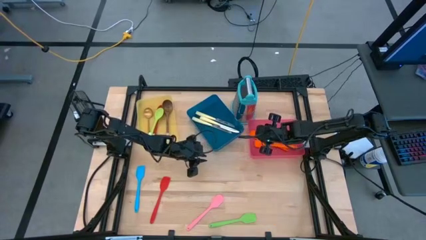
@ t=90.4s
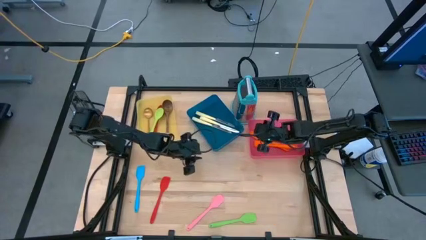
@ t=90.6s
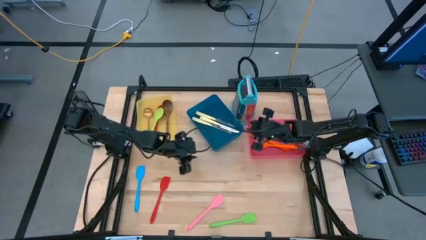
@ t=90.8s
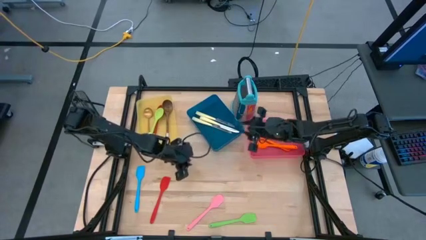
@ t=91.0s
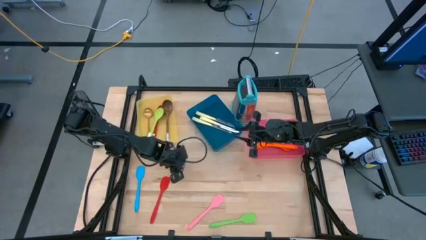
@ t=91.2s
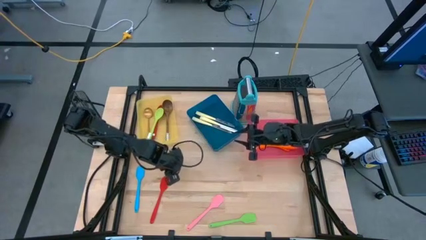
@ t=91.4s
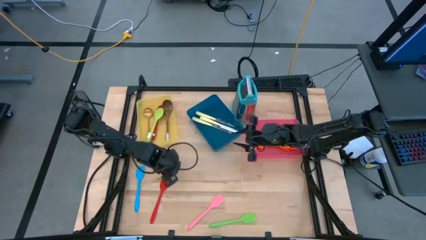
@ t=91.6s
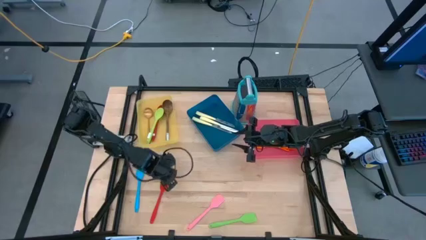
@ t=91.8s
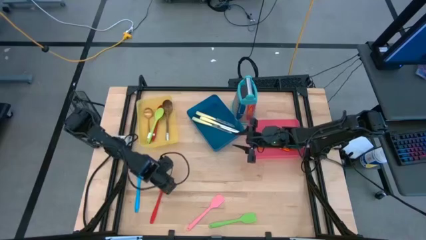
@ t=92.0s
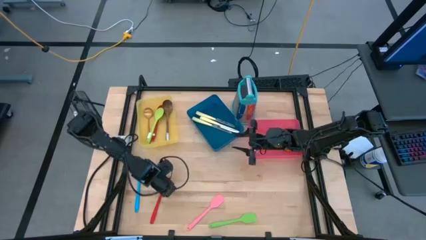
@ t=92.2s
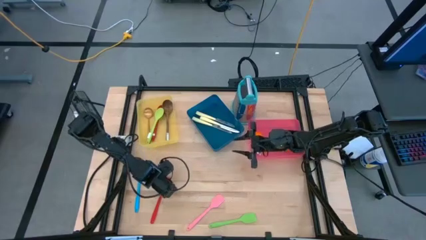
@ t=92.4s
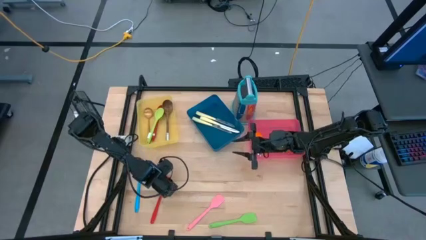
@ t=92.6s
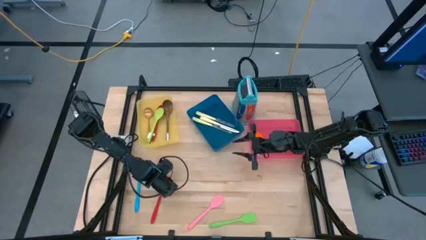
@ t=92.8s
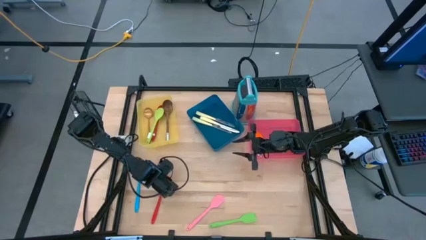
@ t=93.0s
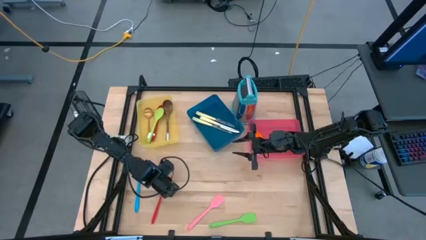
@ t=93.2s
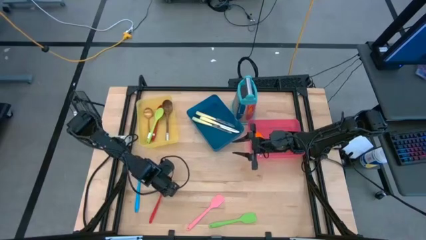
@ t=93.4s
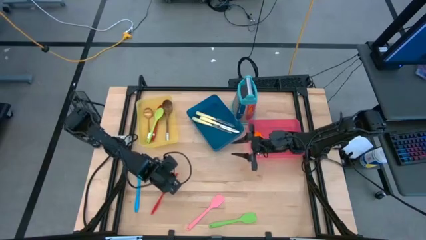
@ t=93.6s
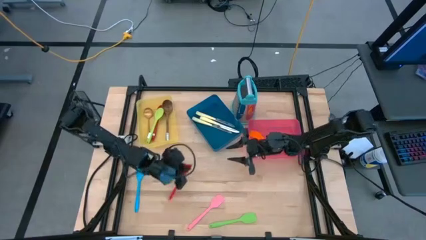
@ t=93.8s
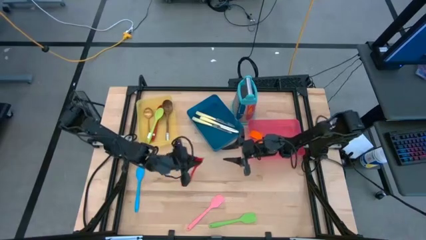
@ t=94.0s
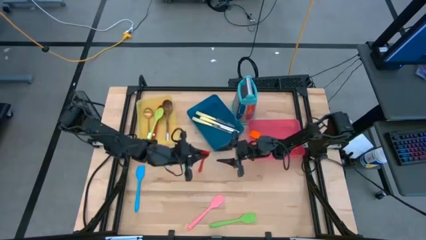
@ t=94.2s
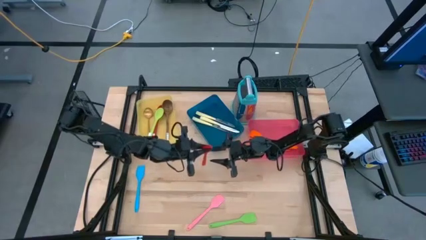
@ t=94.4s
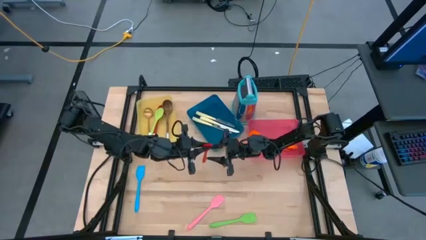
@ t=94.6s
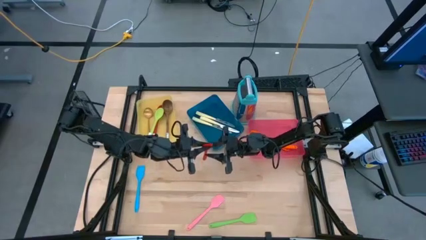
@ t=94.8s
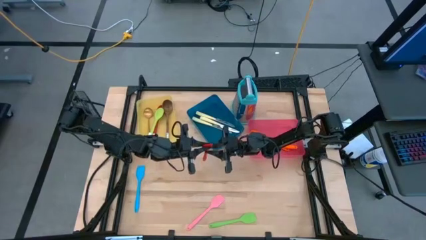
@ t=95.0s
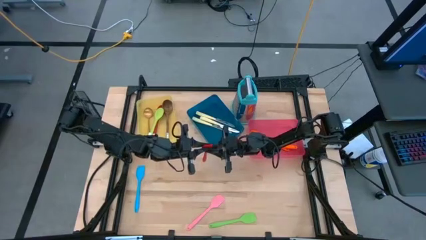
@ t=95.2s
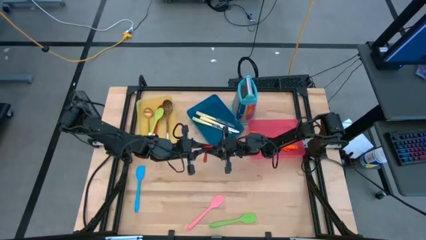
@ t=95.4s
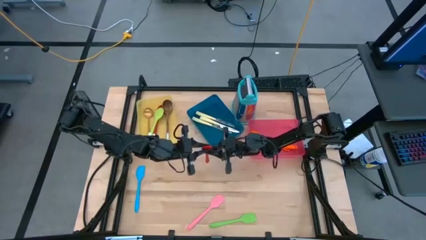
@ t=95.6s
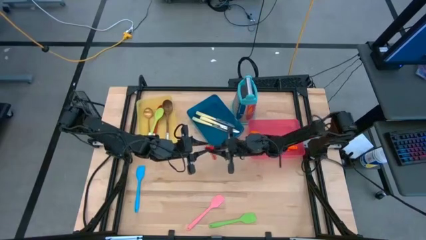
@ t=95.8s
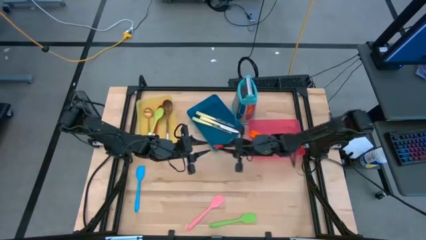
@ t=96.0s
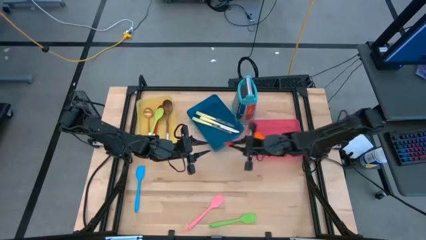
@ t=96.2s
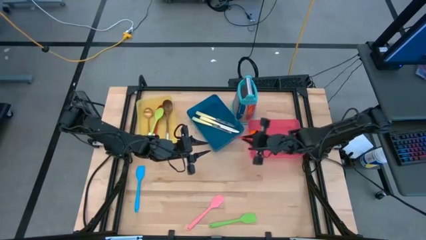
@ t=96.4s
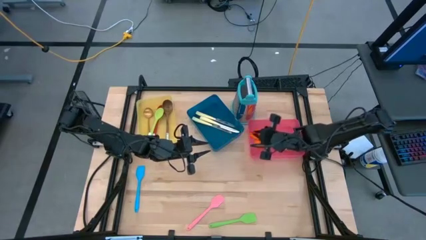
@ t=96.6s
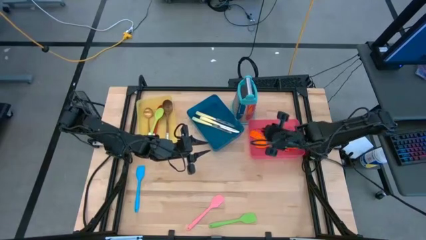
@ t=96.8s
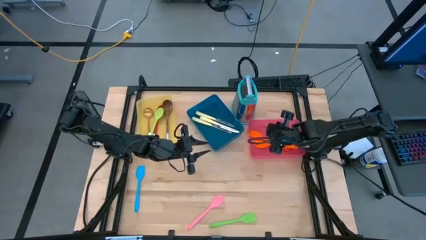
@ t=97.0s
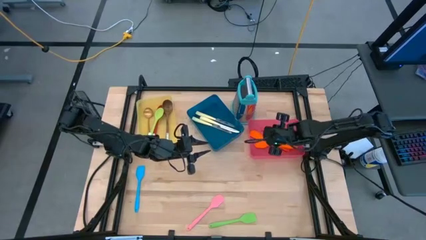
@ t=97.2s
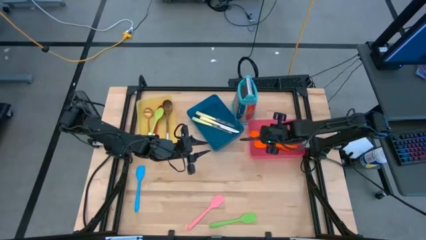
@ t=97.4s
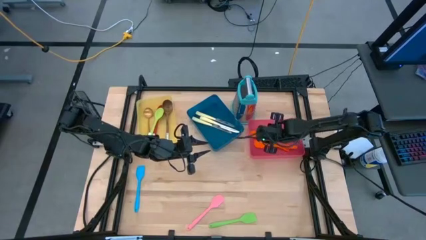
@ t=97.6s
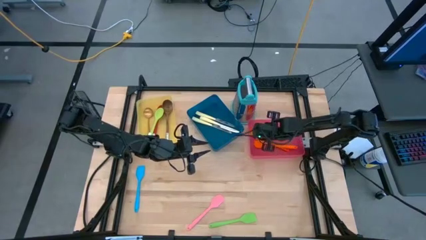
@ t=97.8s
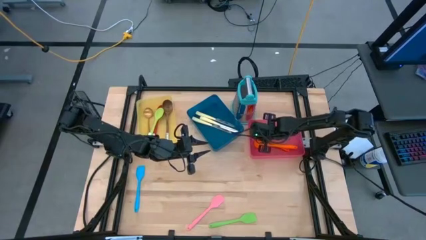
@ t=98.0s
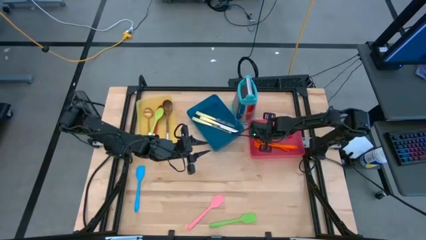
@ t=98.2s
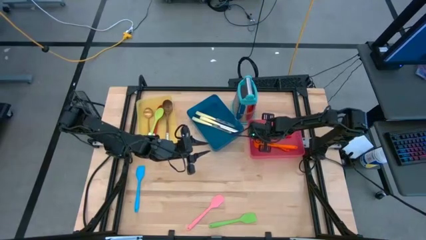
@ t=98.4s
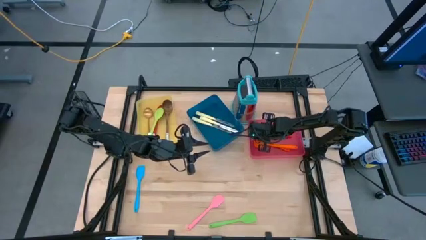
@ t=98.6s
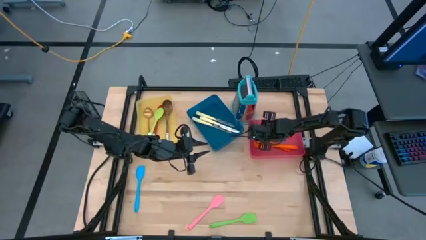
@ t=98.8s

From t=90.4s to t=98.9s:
Task: Pick & Place Kitchen Items
Put the red spatula into the pink bin

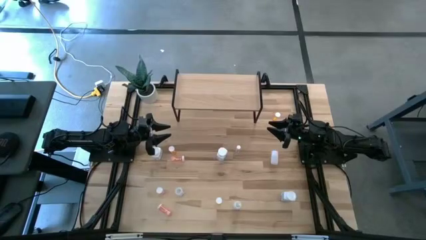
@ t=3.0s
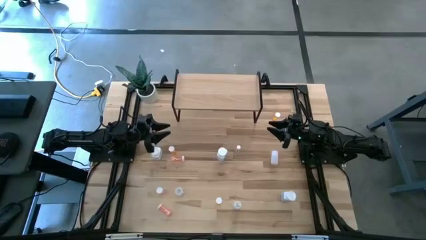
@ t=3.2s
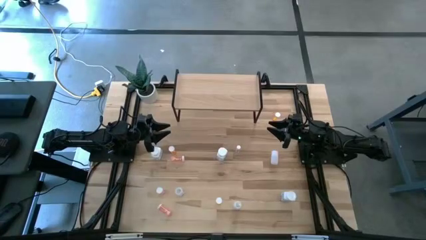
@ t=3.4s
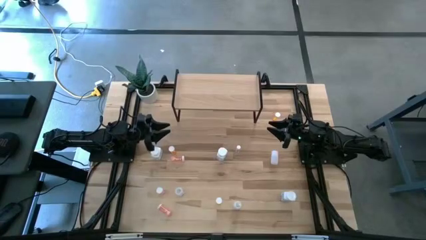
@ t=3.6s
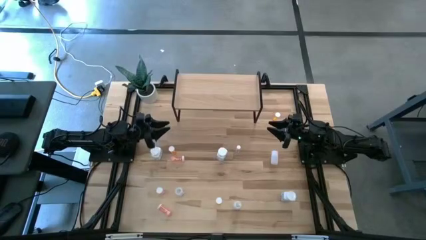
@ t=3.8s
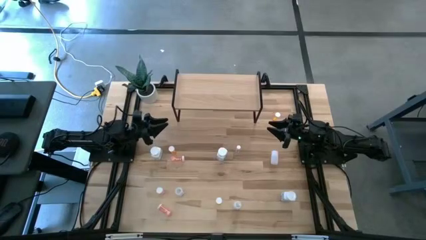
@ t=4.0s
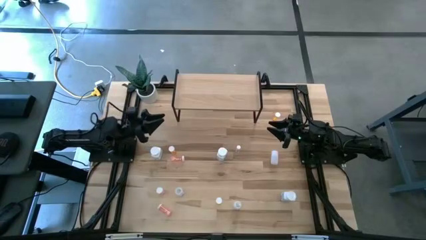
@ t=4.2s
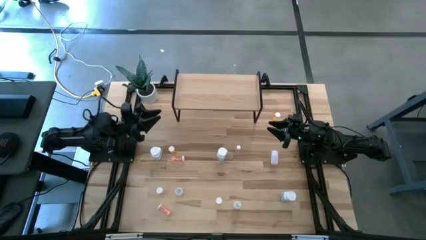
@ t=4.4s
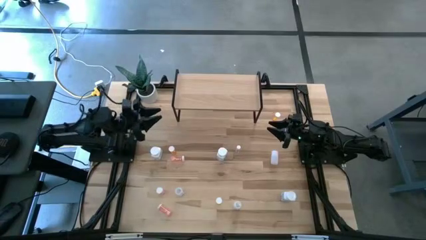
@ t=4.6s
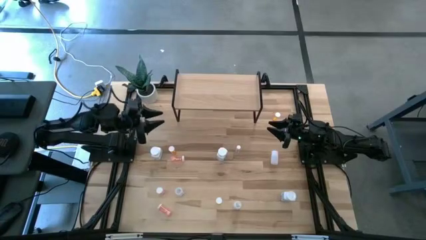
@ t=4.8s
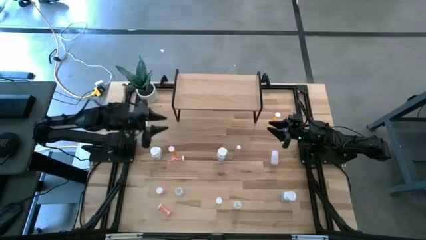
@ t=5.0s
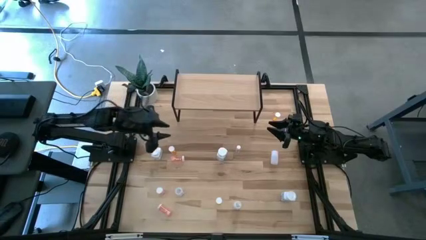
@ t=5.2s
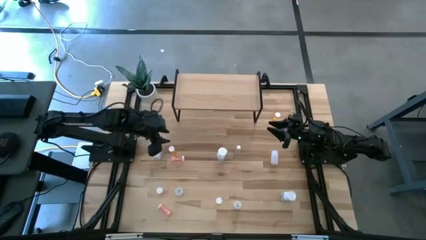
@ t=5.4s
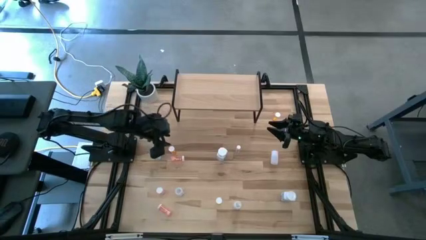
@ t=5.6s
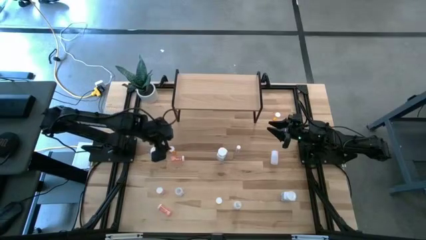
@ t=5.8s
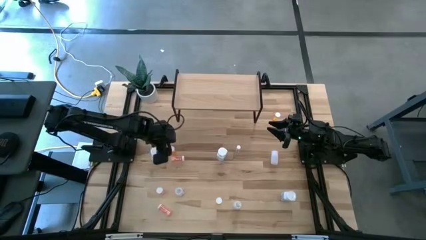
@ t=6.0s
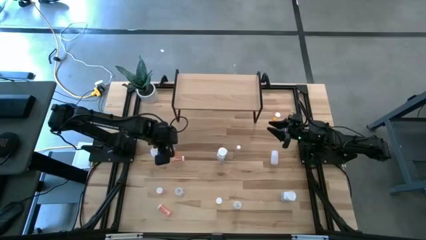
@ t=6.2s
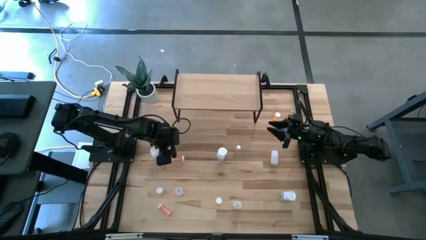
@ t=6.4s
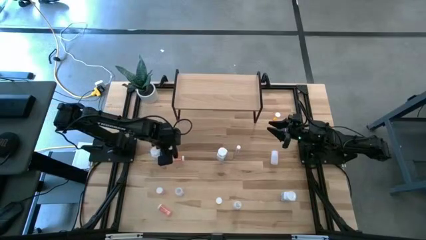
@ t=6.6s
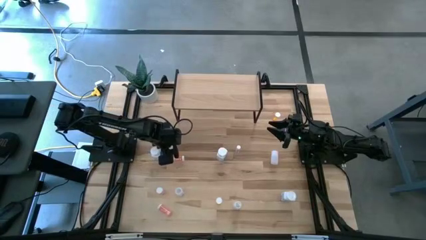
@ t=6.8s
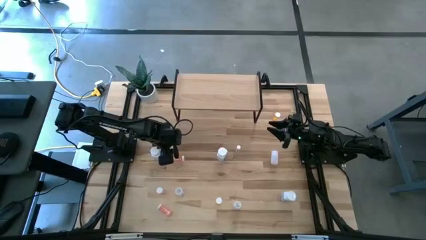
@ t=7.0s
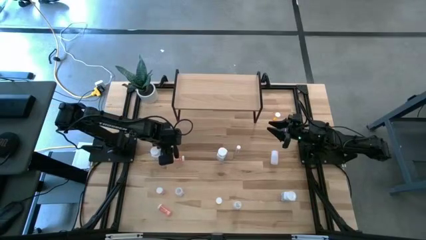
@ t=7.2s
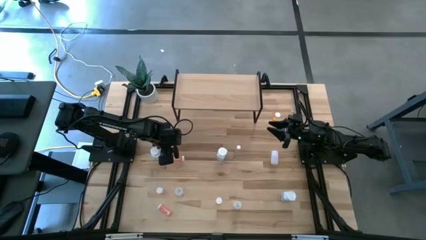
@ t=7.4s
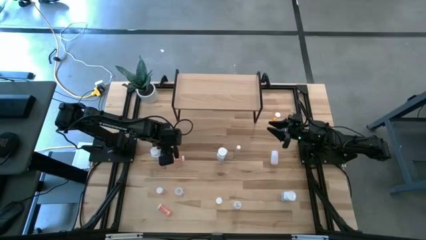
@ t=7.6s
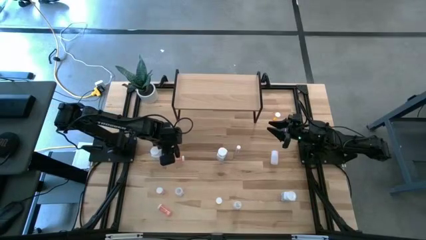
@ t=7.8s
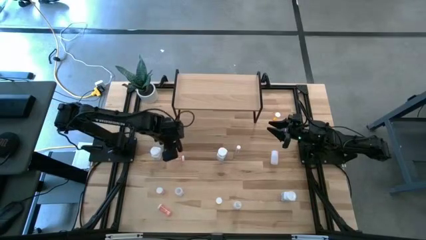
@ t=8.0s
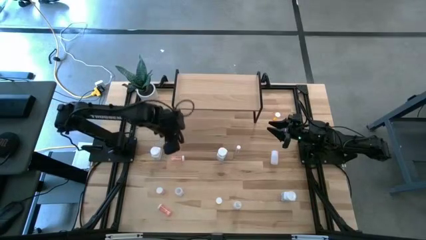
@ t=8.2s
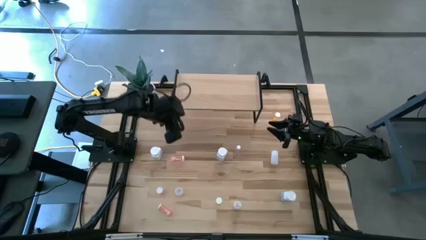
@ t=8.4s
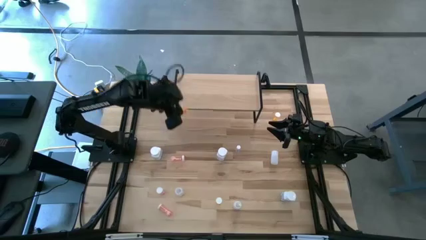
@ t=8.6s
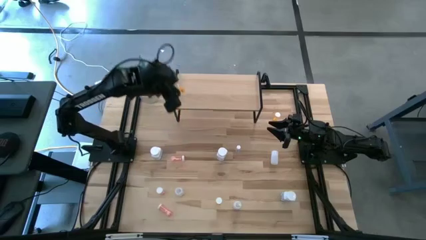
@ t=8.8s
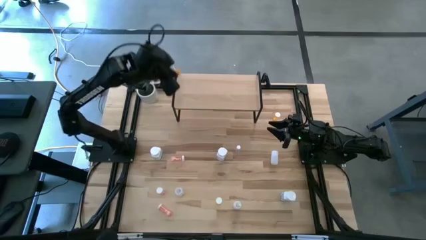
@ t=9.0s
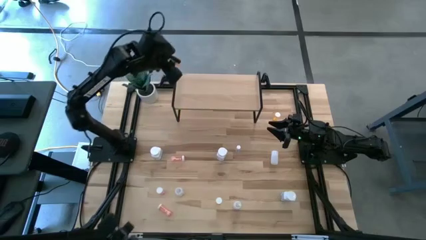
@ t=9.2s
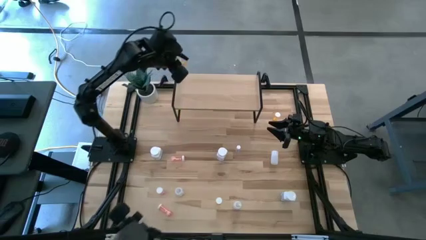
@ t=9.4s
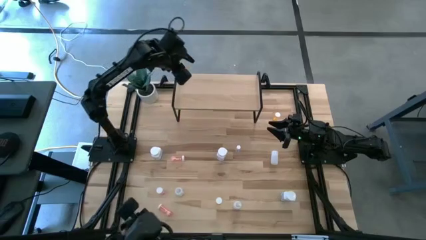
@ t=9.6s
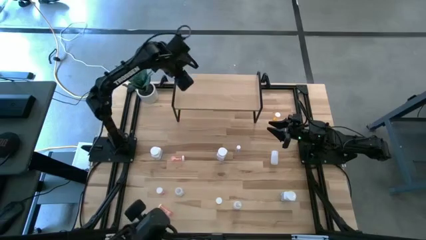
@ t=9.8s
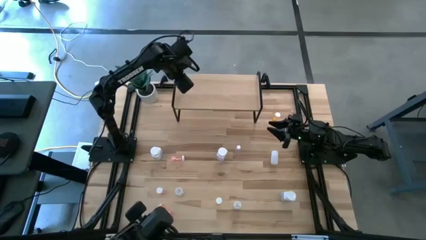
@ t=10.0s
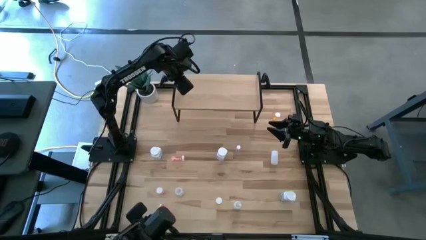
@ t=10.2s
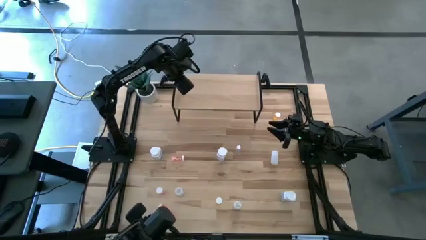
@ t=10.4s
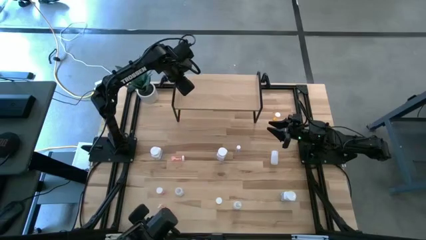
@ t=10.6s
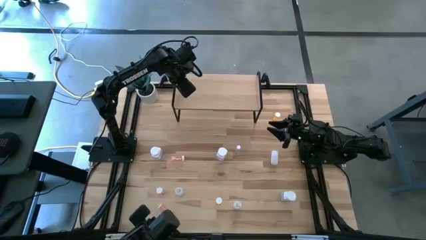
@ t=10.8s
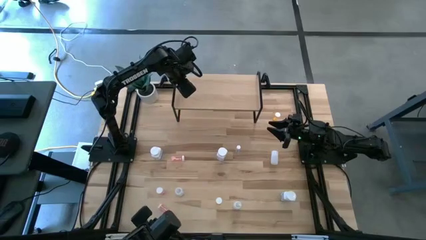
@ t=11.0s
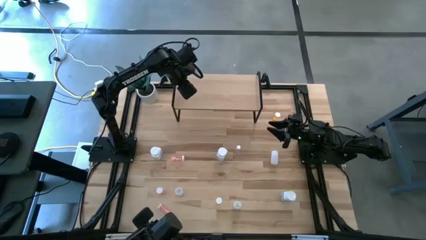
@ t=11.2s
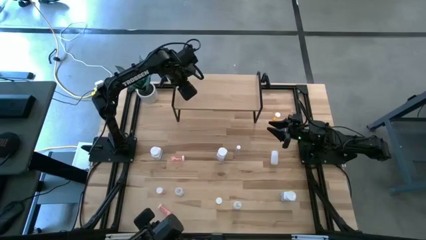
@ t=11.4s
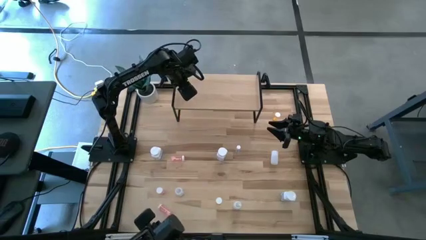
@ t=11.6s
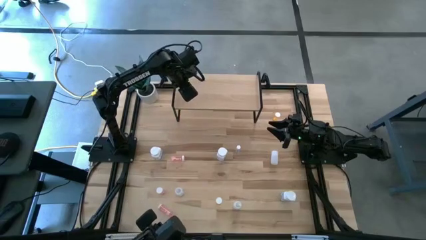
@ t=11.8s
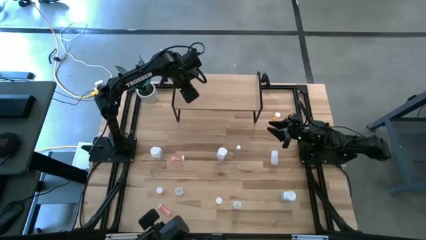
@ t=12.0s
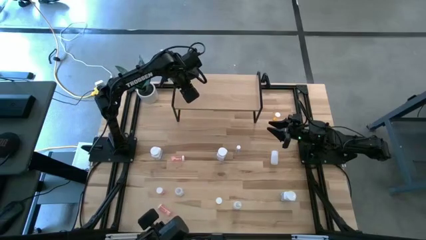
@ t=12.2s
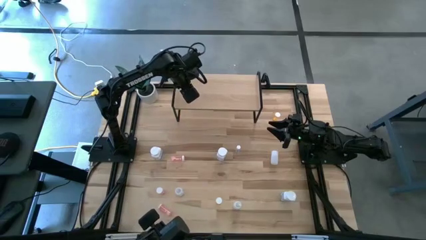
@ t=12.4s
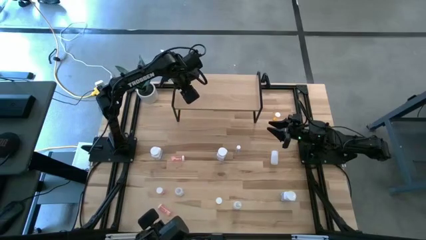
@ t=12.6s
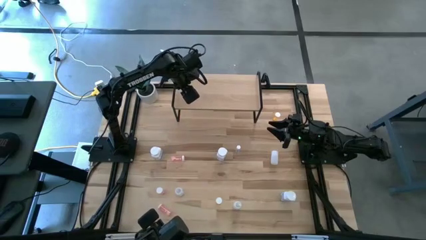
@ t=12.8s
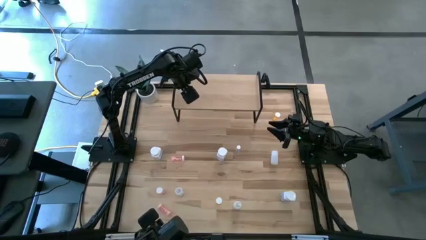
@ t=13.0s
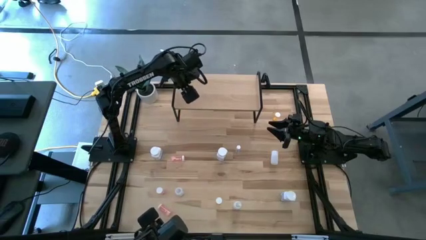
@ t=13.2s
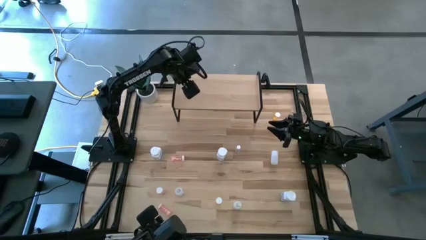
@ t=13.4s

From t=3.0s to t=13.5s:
Task: Pick and place medicine bottles onto shelf by color
Put the left orange transparent pill bottle on the shelf
